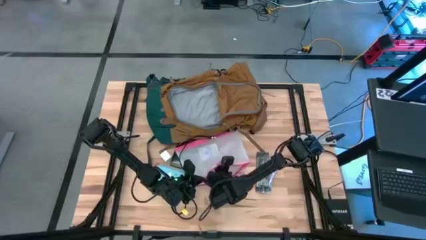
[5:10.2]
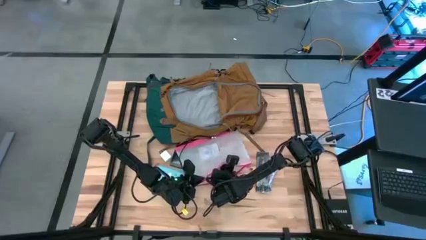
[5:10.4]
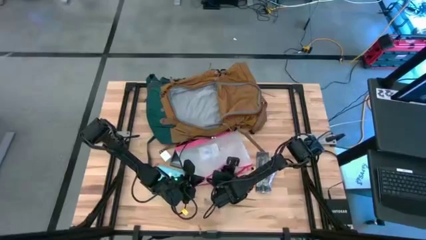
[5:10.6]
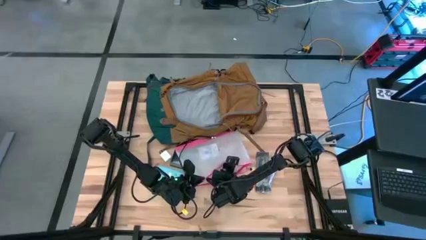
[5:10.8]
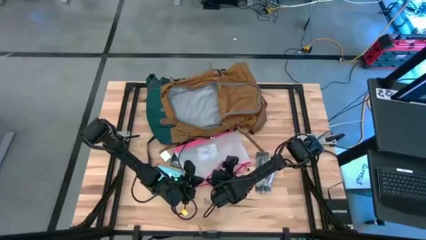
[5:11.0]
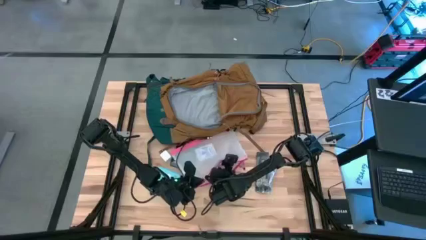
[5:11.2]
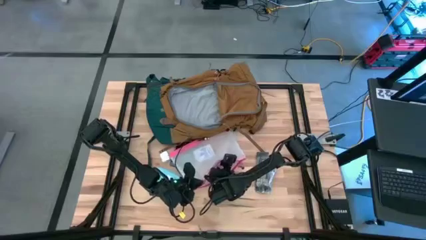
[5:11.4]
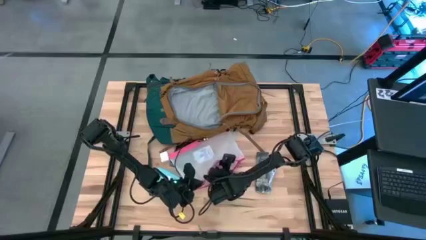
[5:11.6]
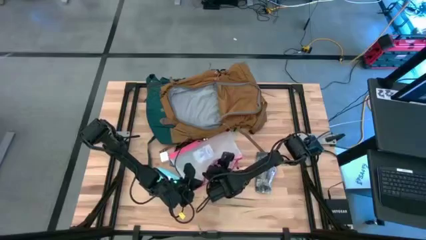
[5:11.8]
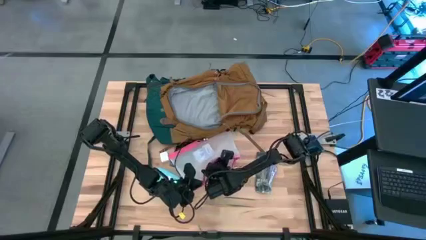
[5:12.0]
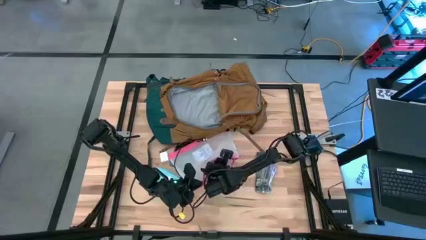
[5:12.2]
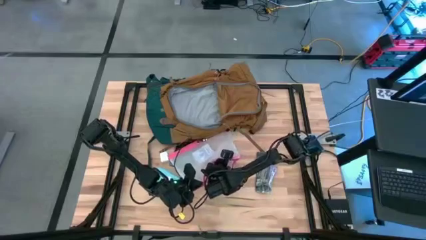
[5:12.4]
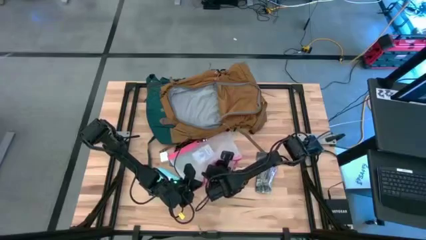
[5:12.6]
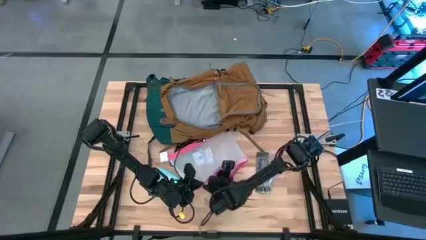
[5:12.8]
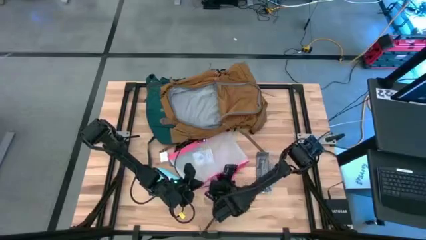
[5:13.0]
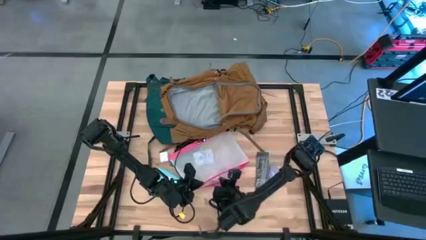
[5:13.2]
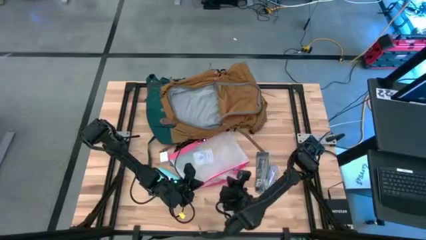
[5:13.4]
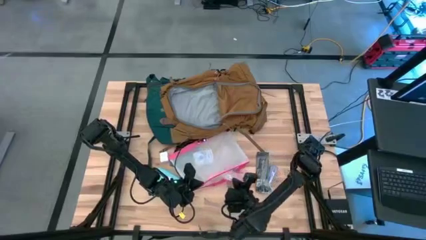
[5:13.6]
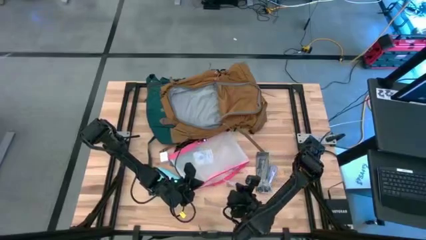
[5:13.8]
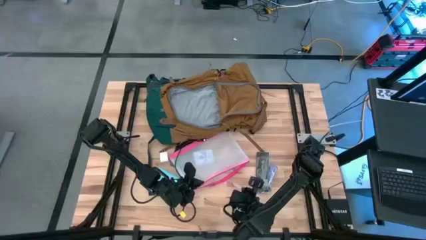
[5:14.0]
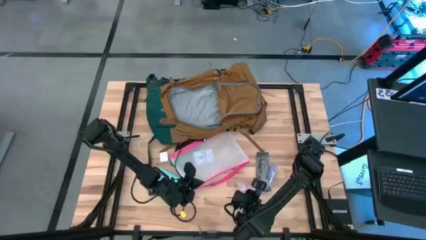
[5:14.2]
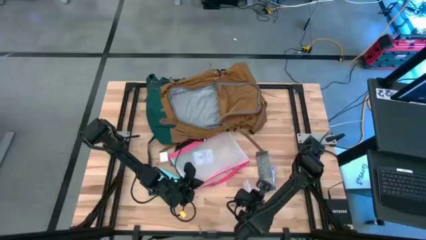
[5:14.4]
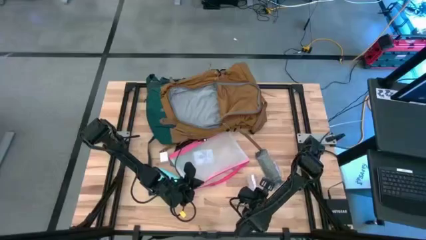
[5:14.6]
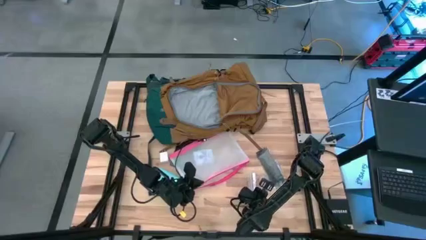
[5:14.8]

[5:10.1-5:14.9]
Task: Unpack backpack
Remove the pink earphones from the pink zipper pouch

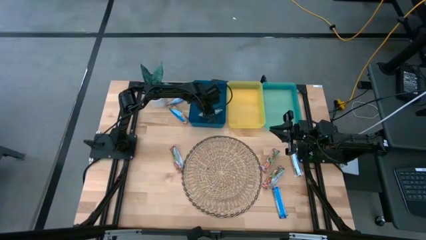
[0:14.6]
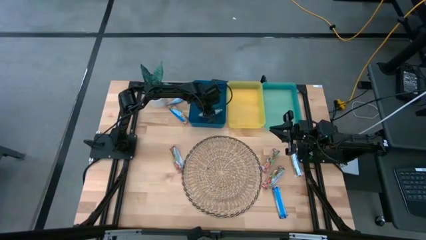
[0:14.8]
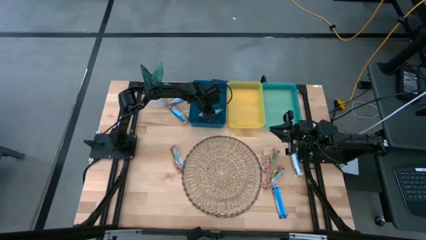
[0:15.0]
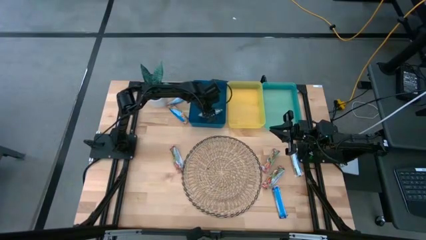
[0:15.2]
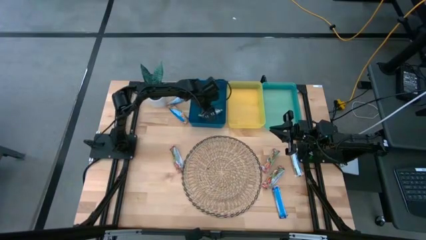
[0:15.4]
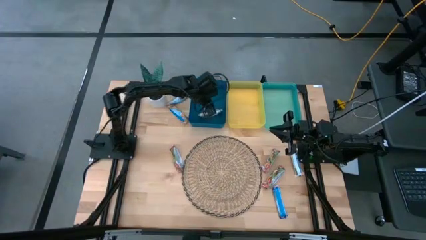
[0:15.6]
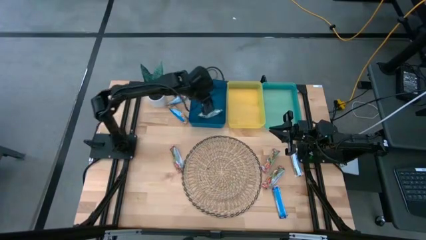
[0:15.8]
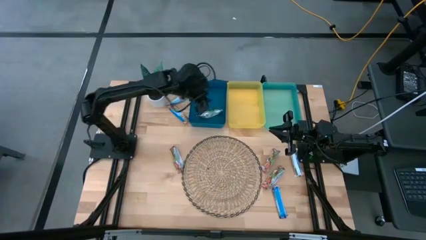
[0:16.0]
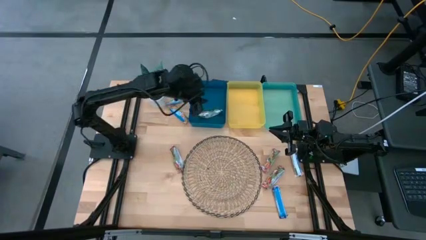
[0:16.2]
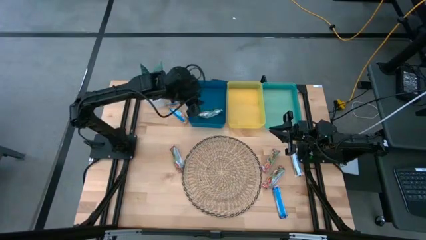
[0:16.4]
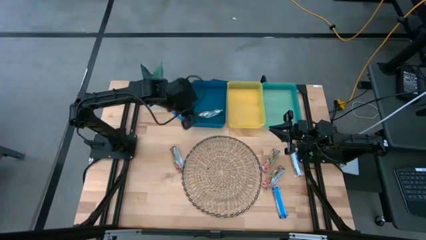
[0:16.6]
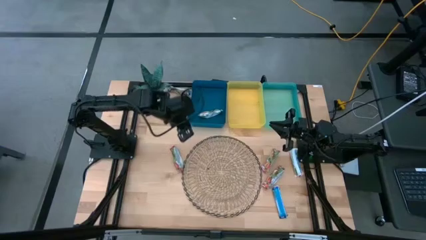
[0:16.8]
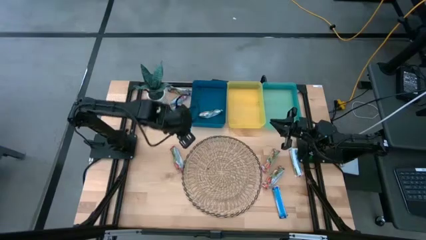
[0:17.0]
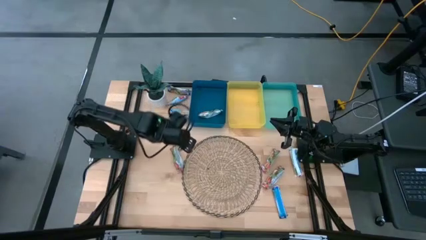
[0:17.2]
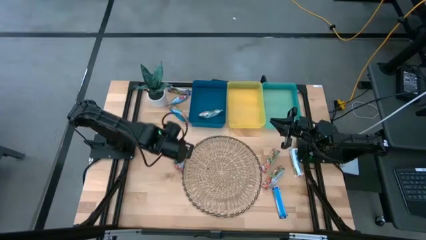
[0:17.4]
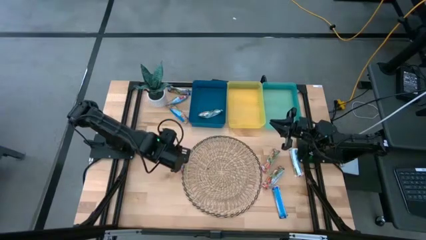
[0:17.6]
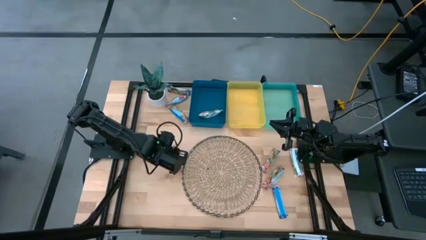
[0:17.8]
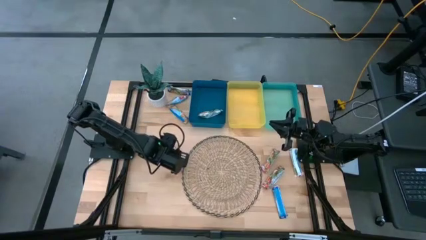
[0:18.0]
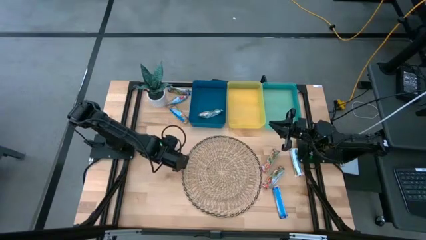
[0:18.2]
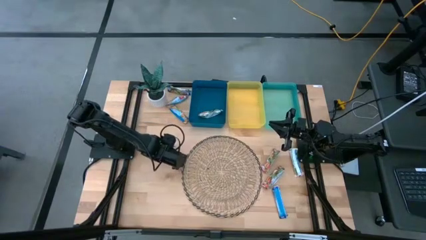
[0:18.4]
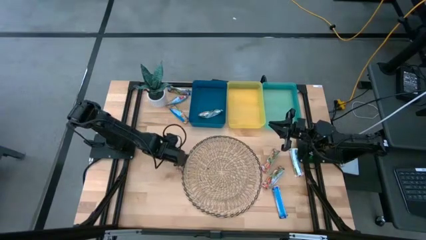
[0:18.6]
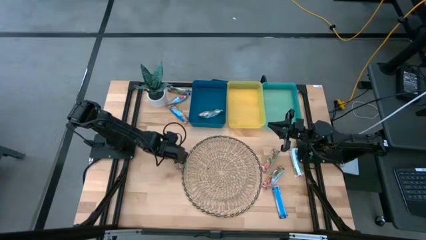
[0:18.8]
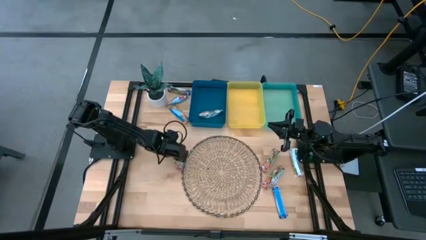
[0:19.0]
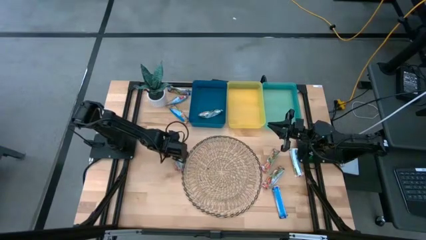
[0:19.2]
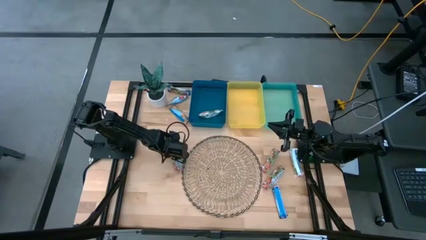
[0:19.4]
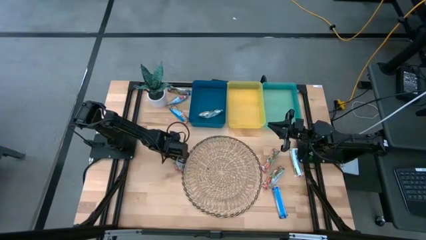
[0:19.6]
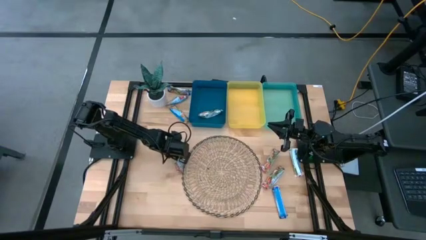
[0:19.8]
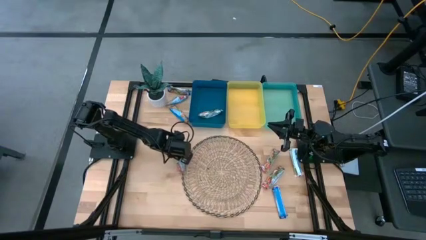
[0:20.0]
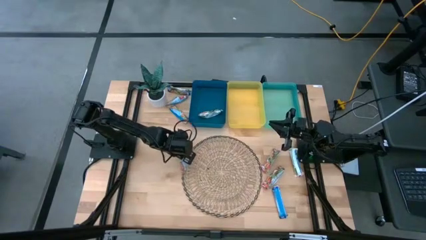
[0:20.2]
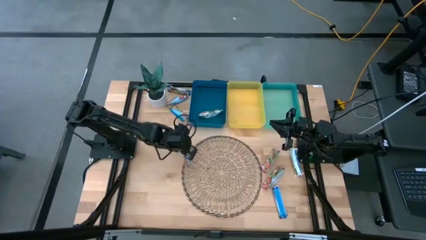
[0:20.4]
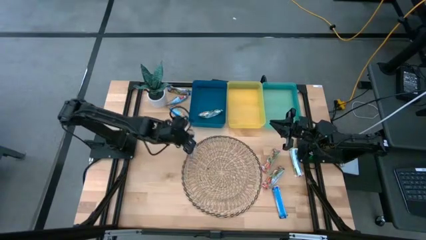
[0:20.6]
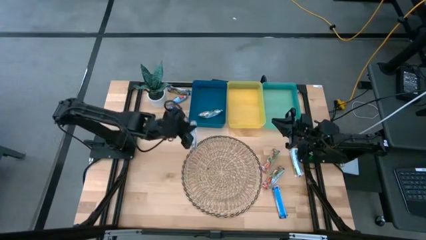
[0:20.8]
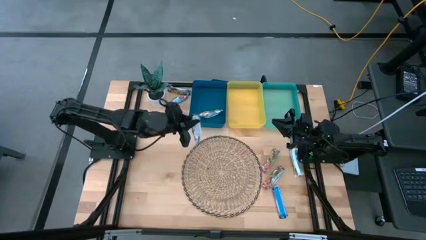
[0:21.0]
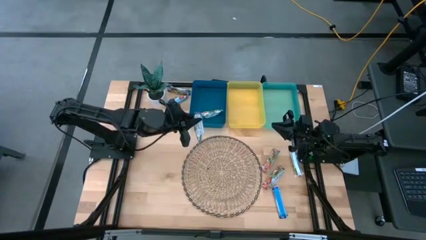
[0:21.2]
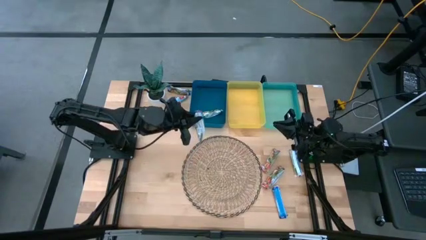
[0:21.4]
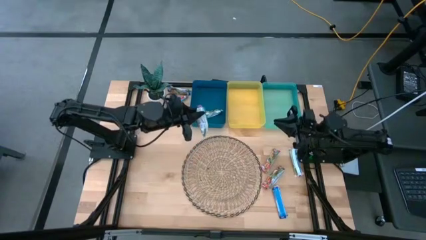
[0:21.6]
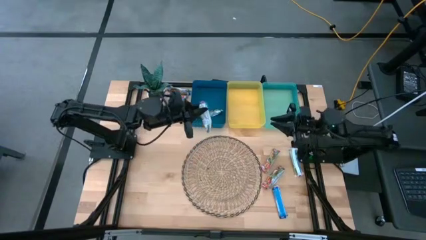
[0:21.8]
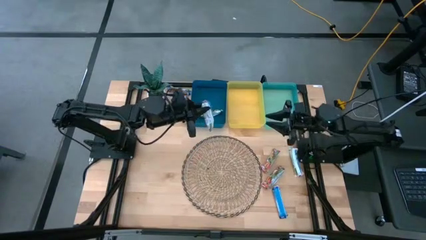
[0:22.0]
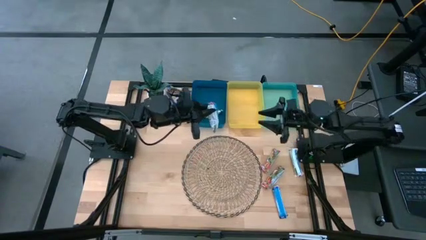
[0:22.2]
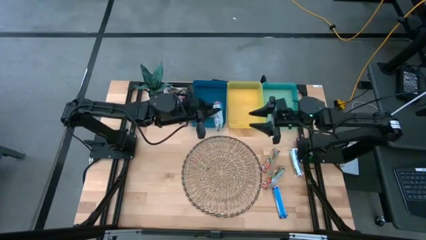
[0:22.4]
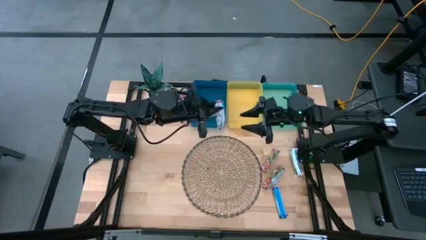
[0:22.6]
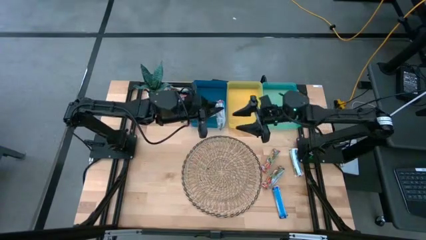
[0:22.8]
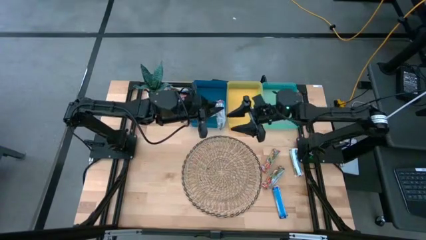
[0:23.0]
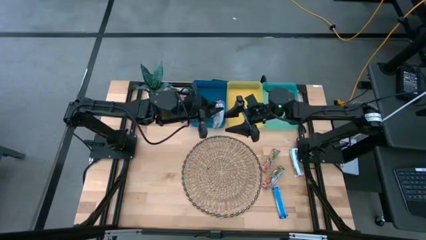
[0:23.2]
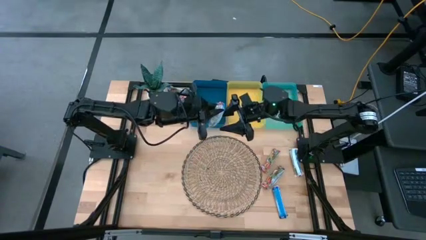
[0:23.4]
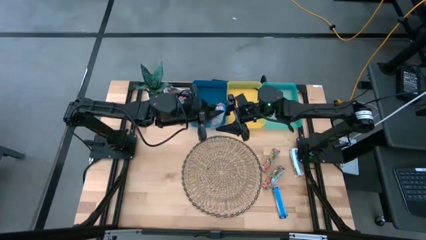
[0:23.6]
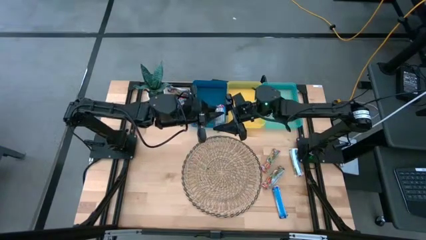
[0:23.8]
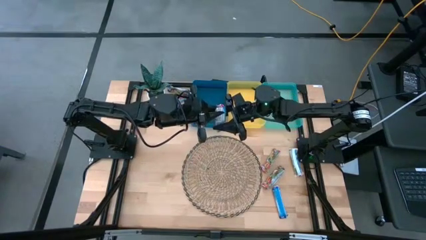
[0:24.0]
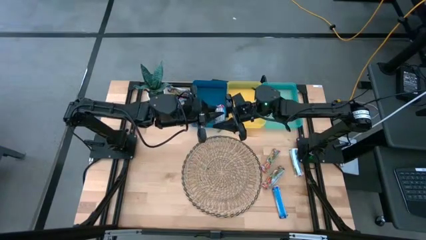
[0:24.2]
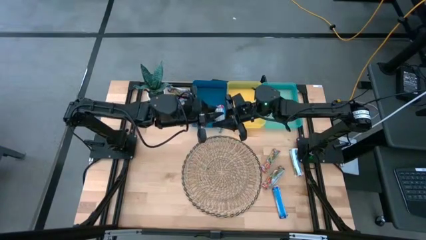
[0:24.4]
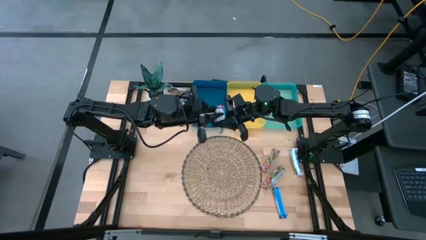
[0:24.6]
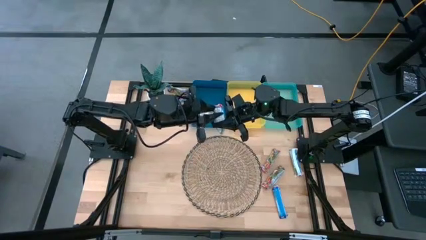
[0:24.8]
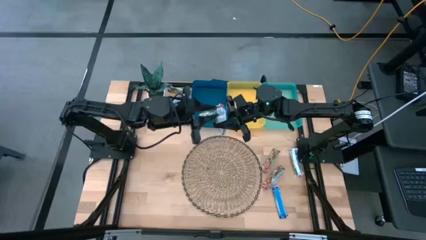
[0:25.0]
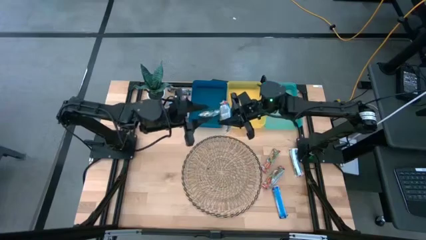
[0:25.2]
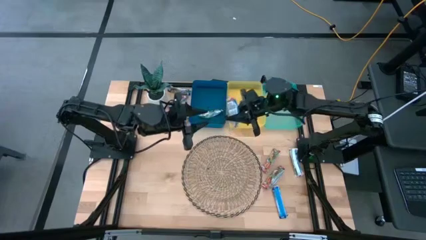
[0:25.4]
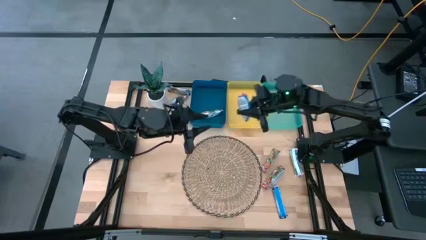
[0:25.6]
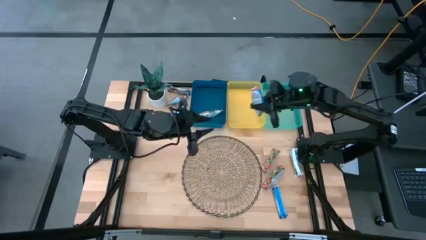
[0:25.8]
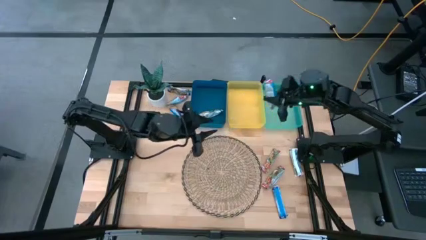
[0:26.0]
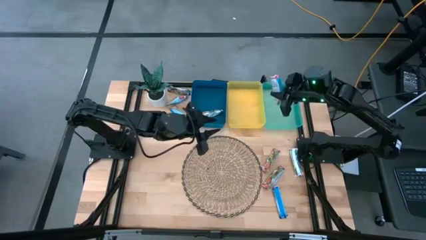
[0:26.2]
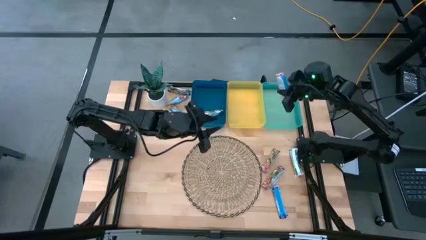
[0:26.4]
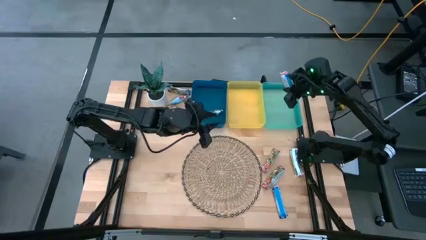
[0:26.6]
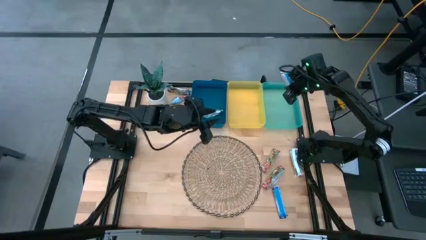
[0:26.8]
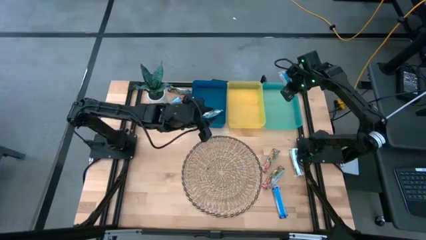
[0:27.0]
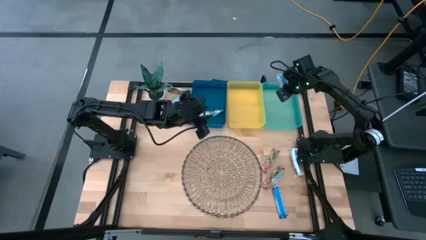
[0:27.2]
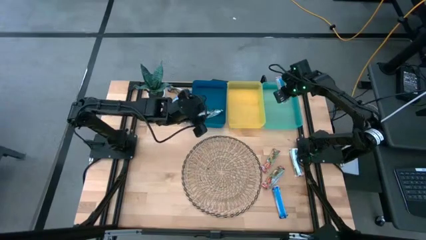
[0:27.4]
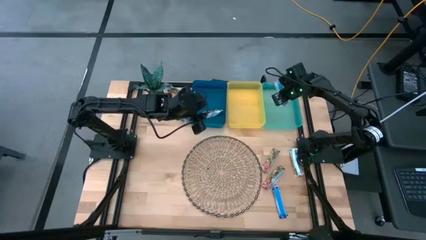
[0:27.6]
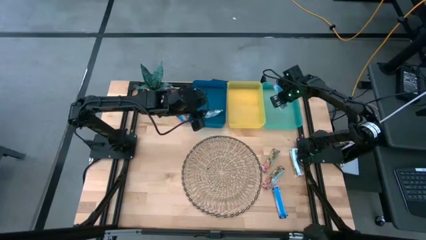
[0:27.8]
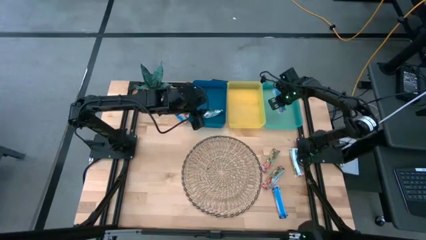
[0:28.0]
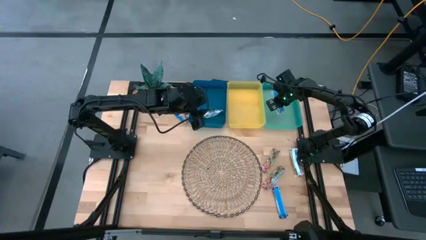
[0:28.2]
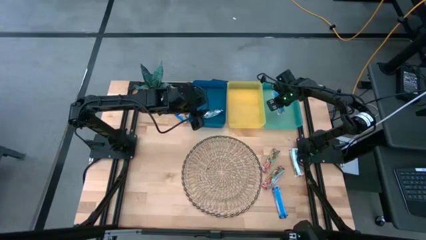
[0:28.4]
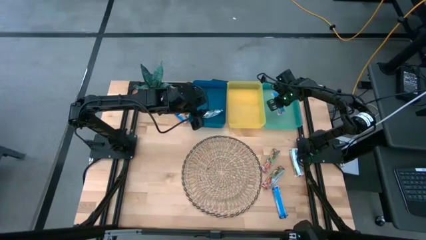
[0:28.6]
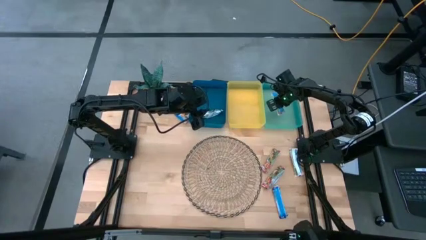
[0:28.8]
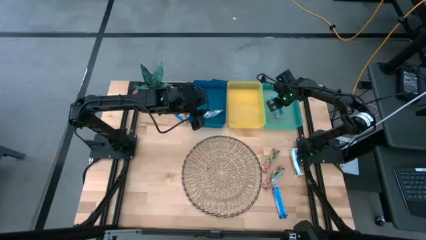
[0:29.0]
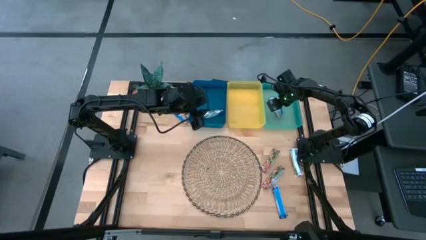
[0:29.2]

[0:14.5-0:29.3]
Task: Pick and place Granola Bars by type
Put the red granola bar into the green bin
